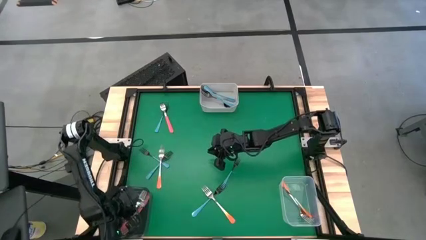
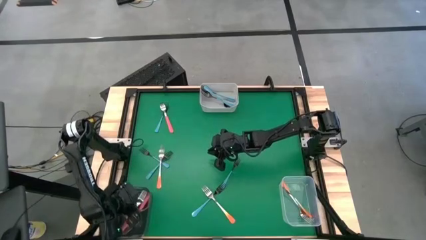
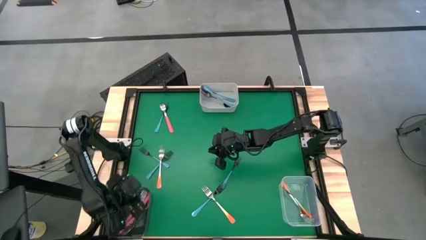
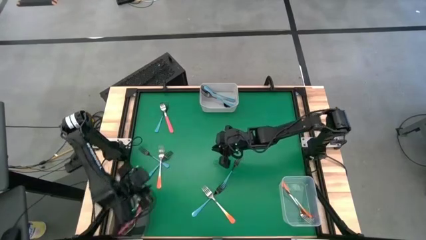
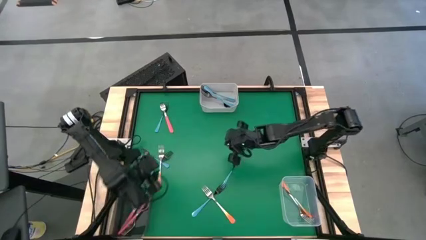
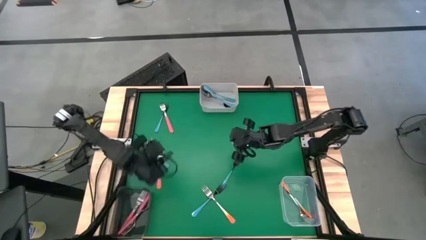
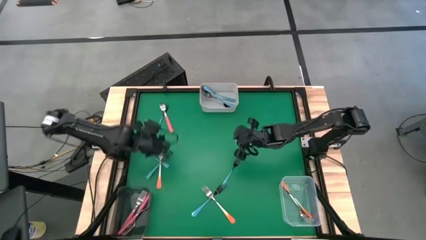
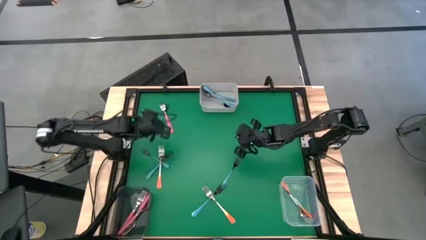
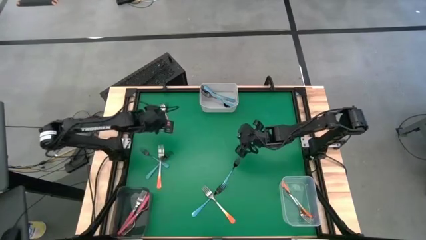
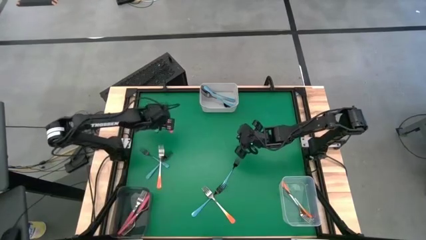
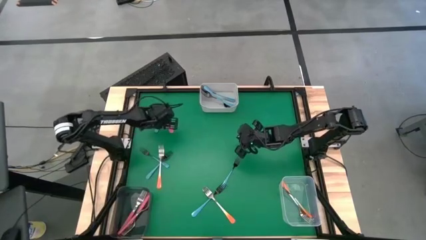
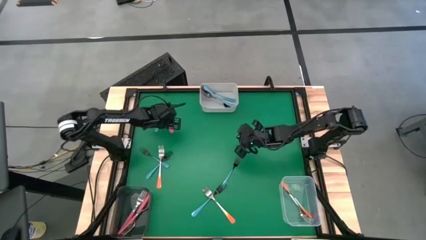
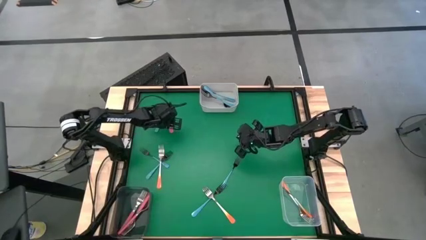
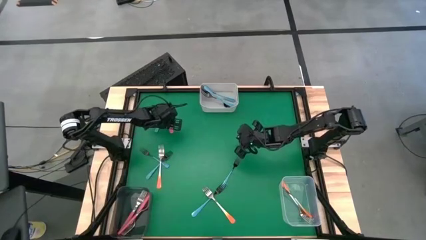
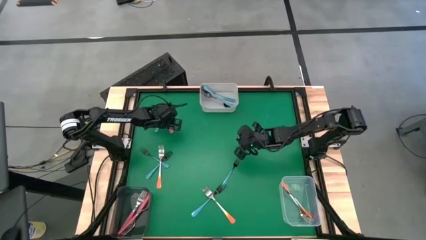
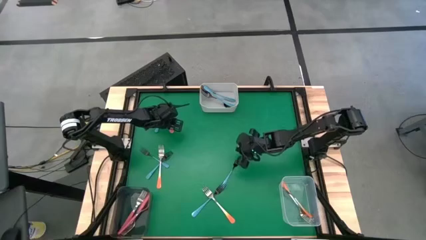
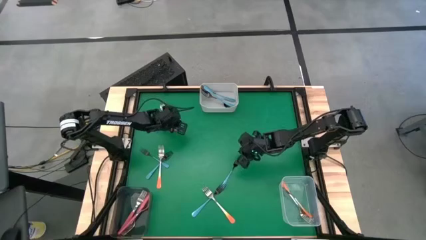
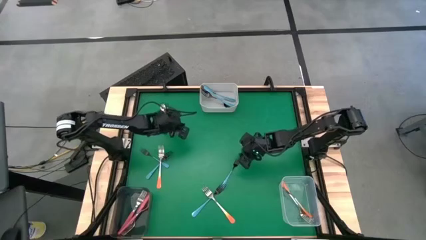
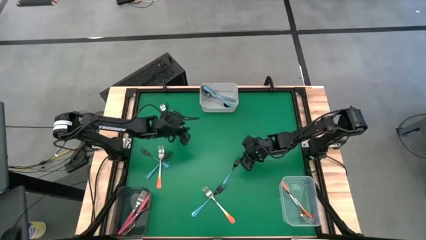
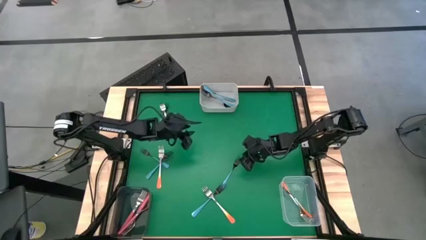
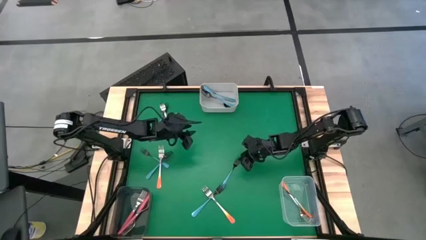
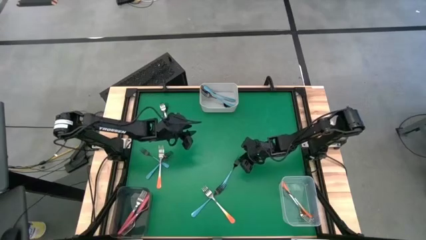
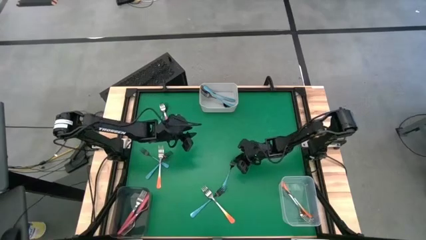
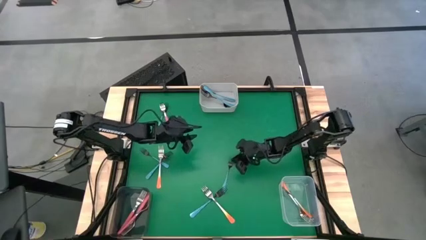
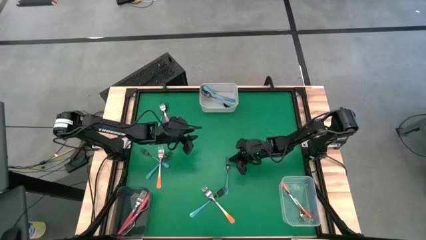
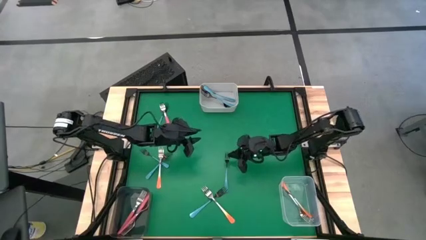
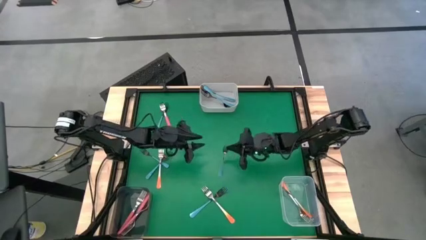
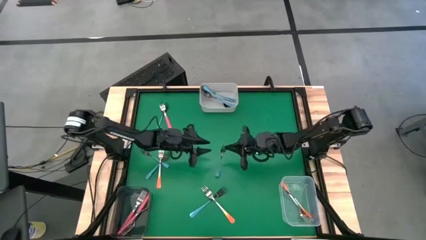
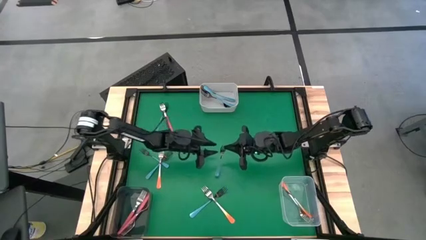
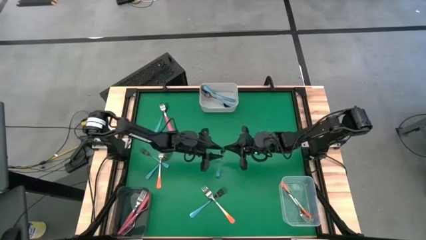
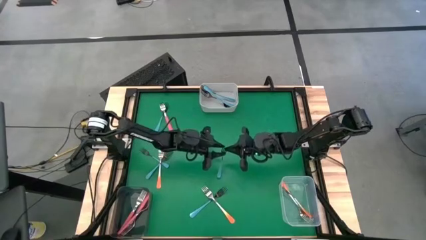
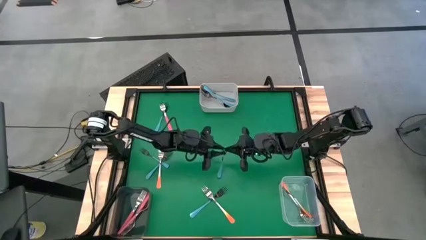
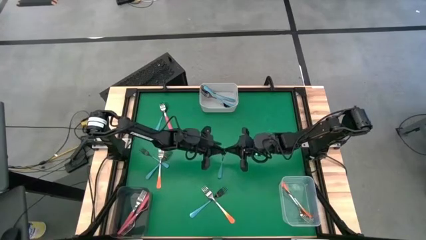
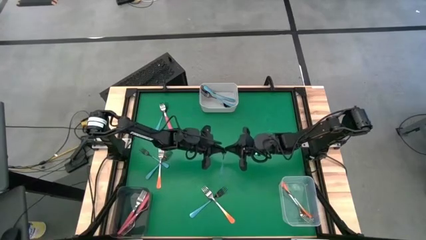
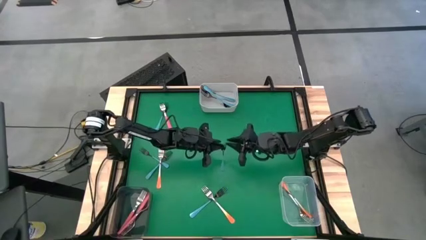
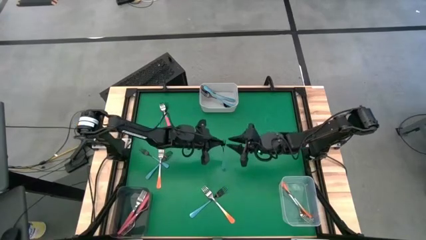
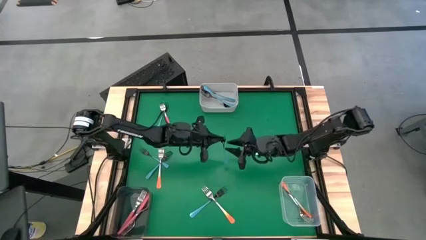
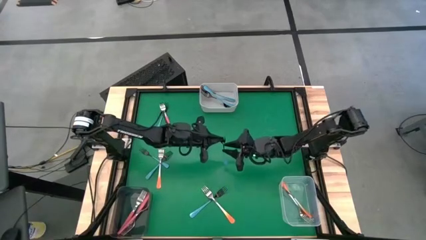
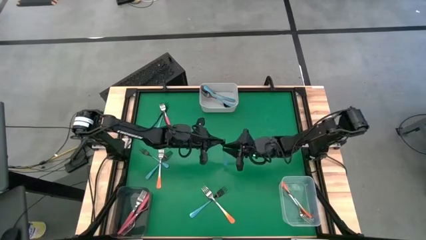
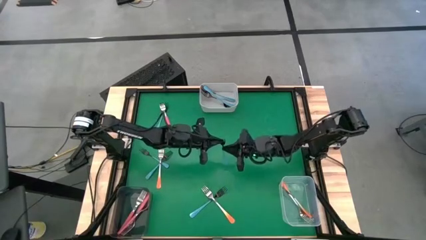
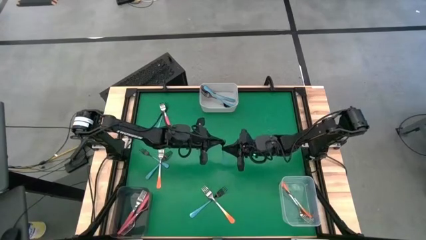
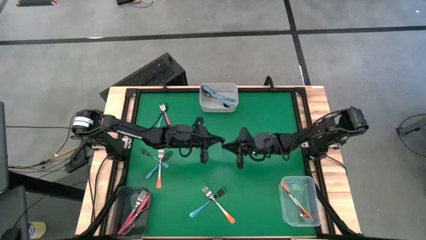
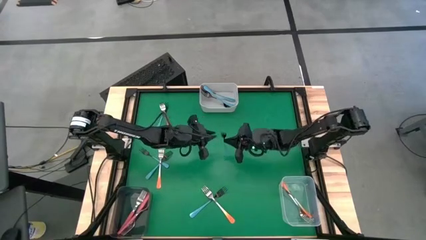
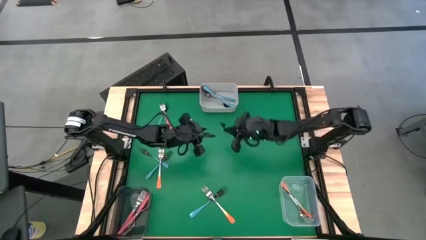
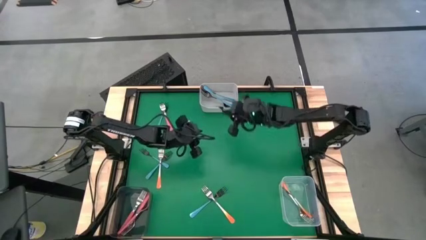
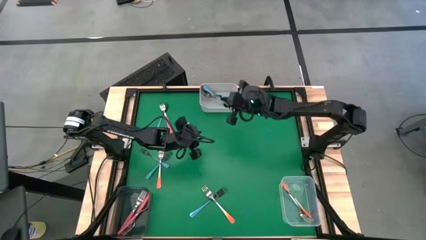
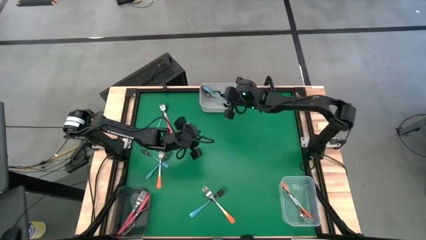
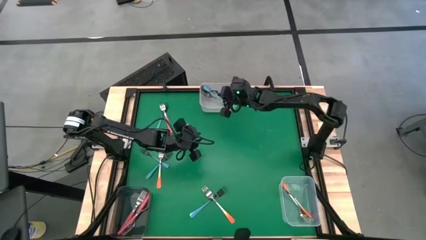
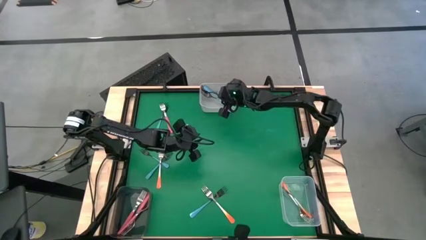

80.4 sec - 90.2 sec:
Task: Sort silverware by color (type)
Put the blue fork into the white bin

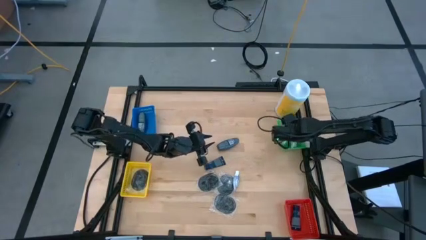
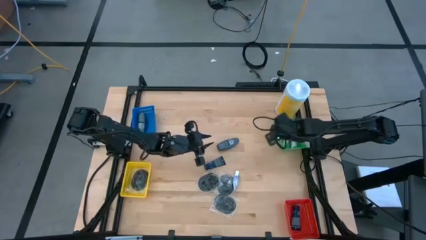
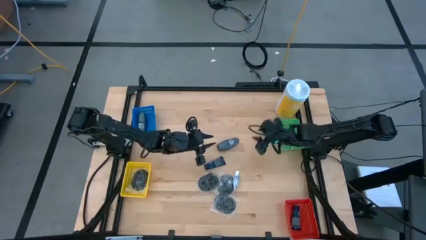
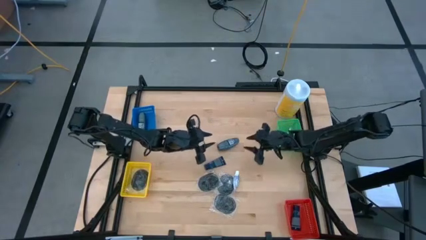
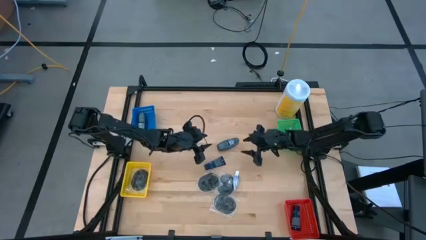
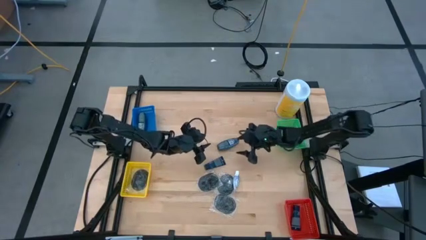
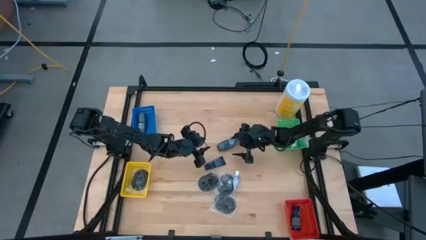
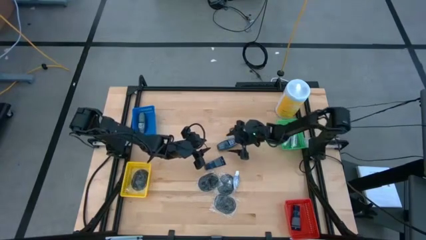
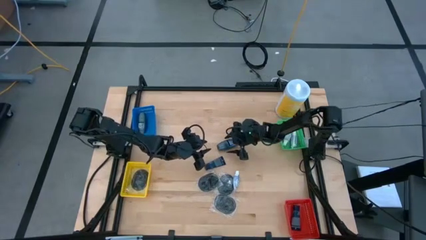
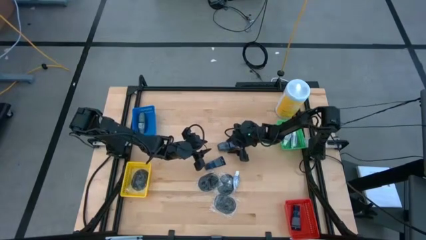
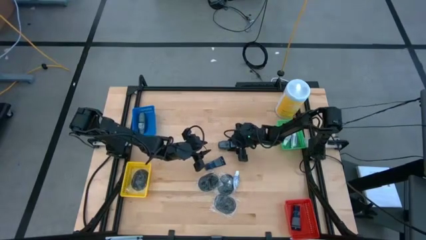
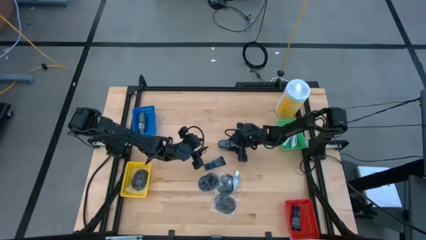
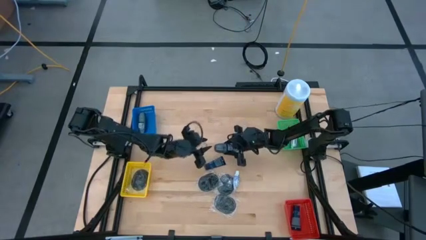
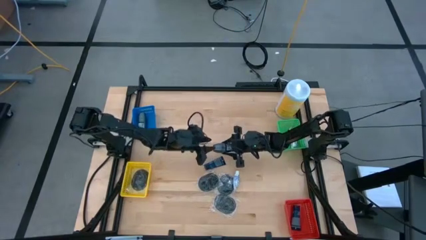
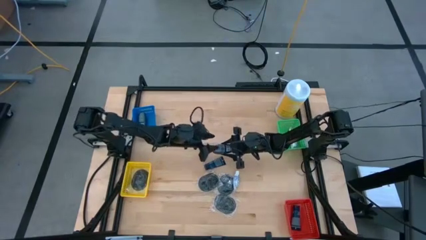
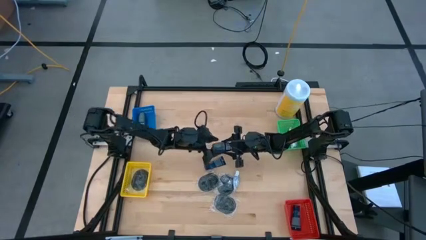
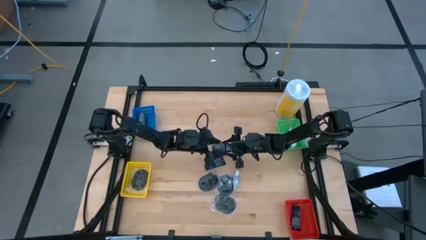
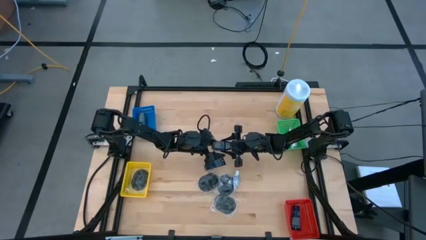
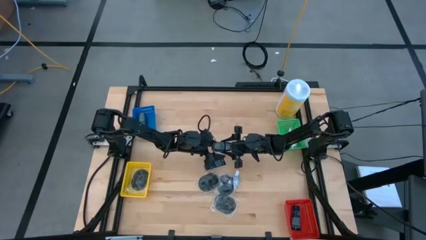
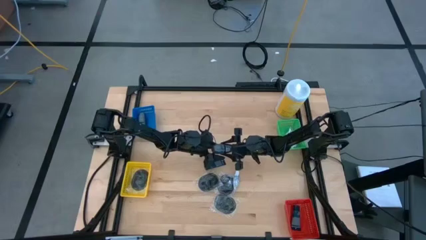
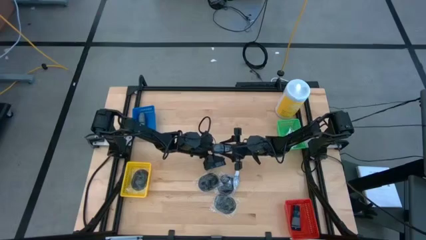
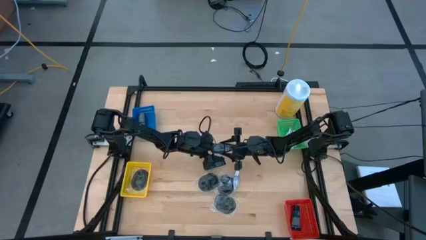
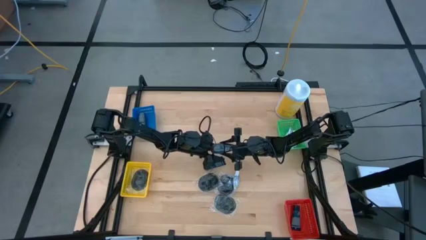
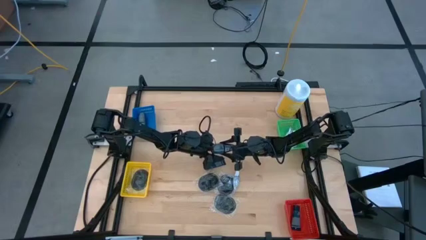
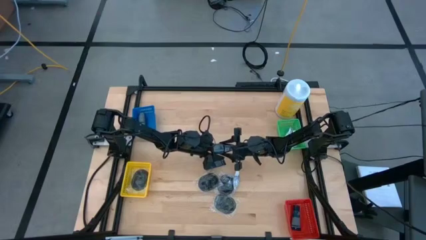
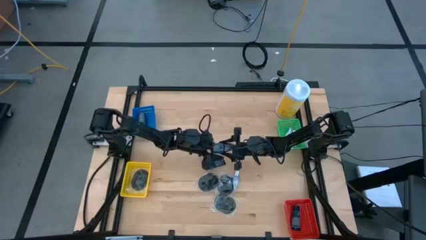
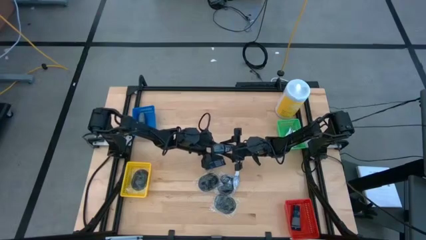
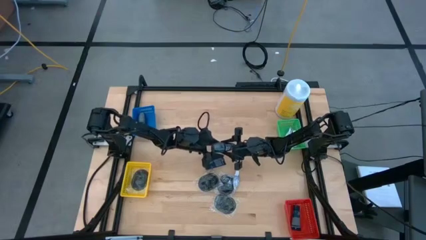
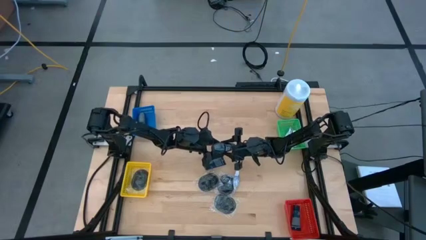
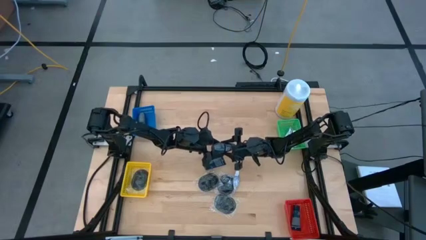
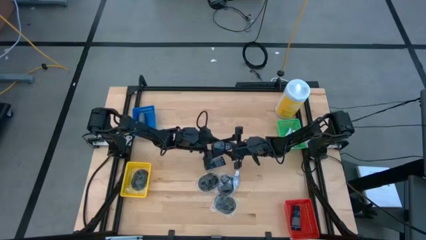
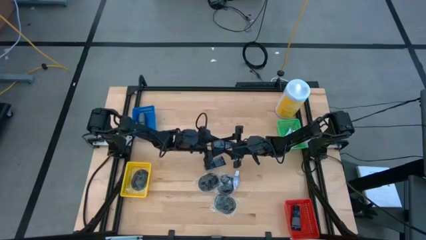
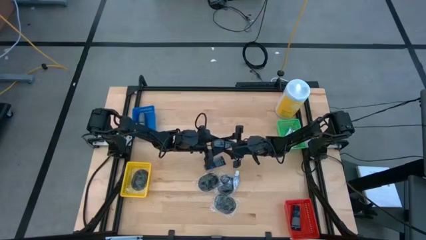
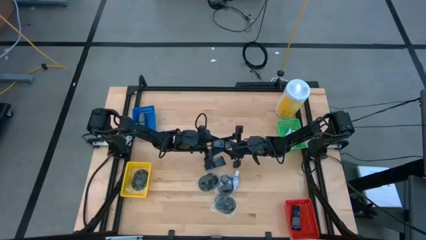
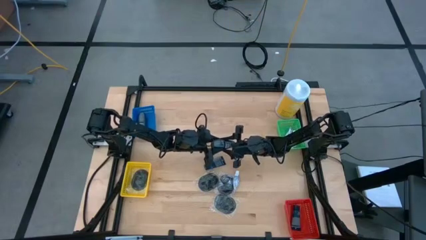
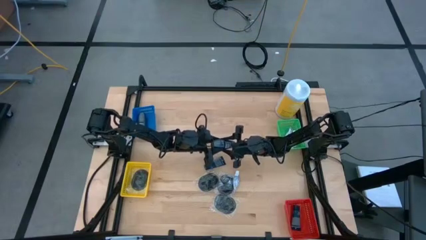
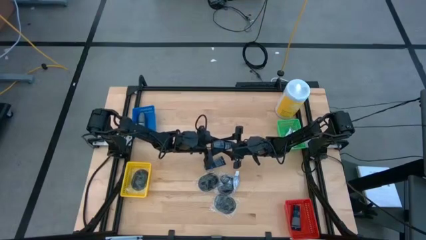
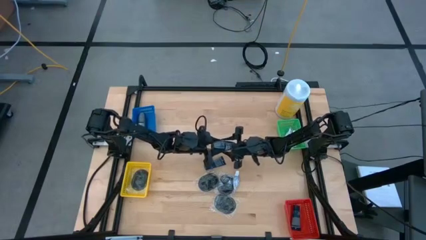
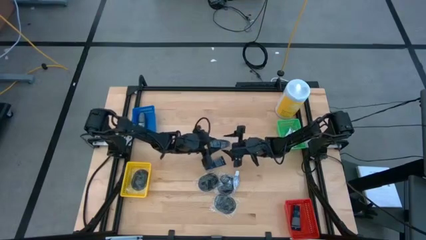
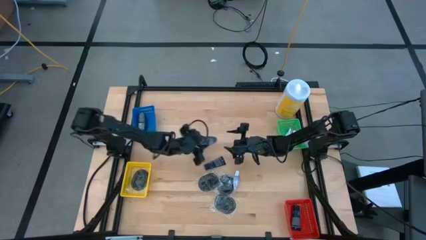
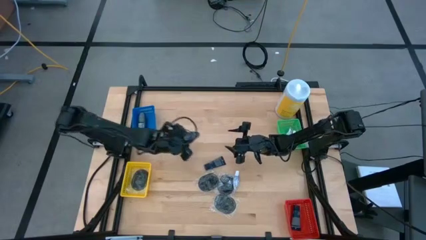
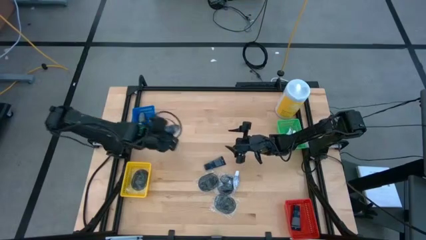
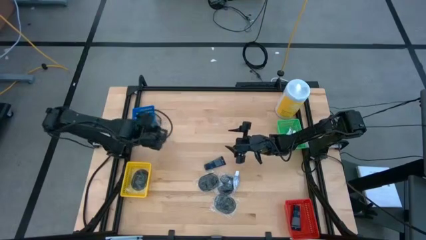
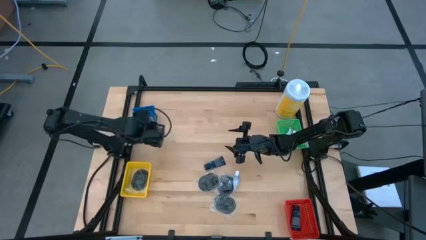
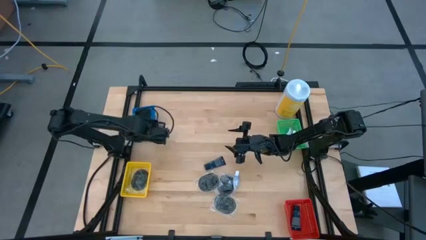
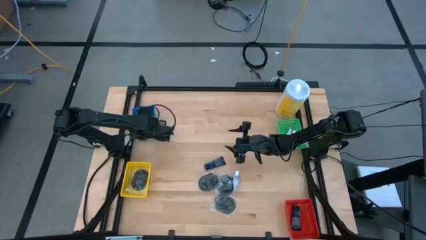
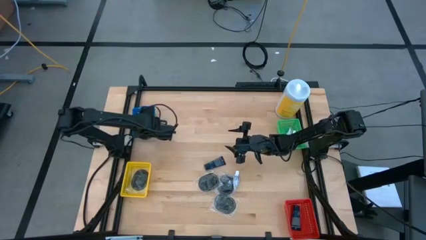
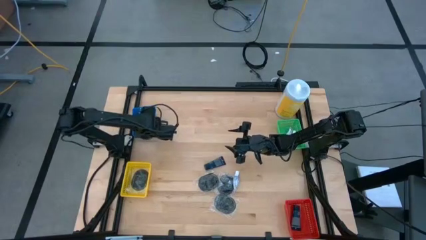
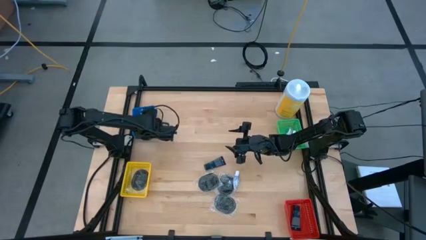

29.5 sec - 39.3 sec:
Task: Pick & Place Travel size toiletries
Put the gray deodorant into the blue bin
